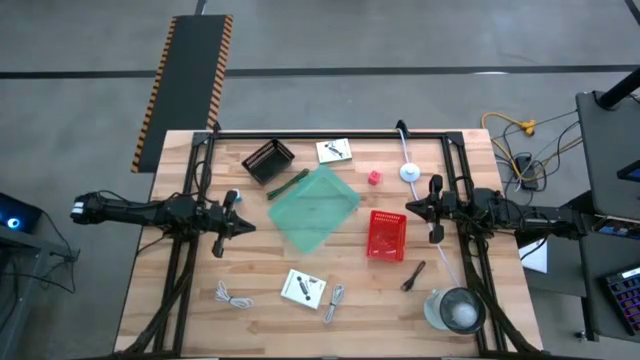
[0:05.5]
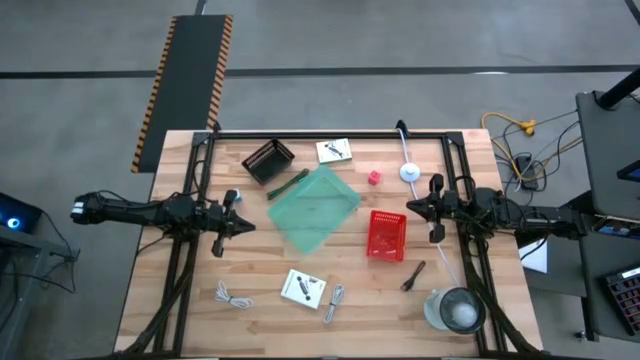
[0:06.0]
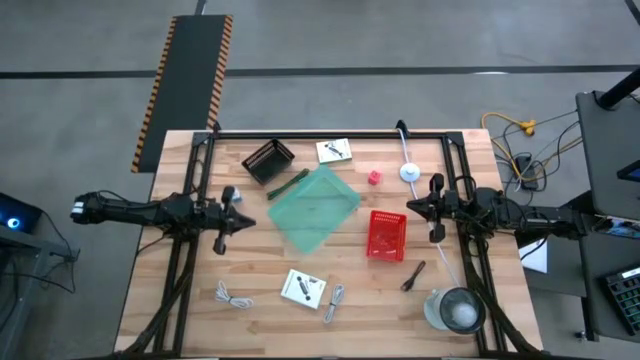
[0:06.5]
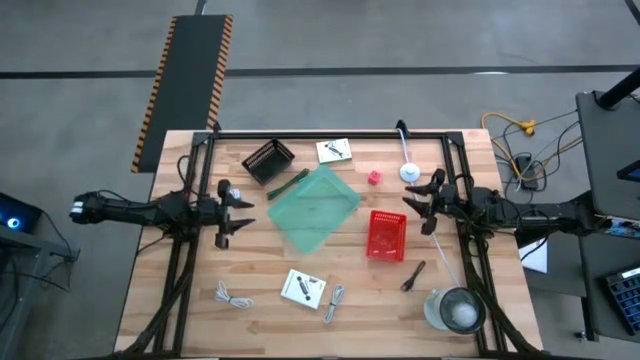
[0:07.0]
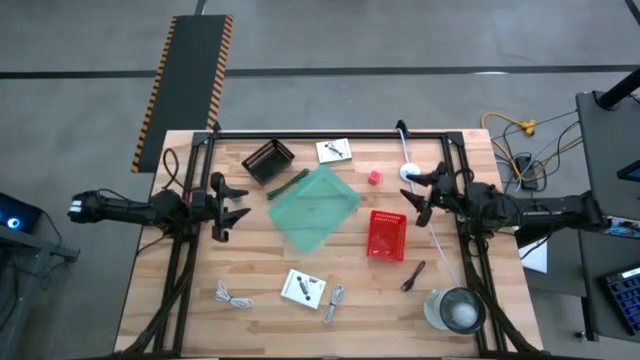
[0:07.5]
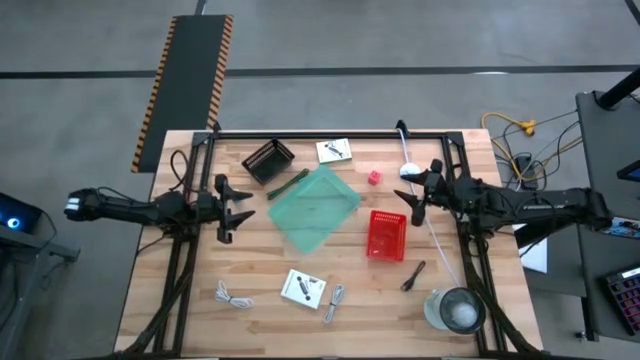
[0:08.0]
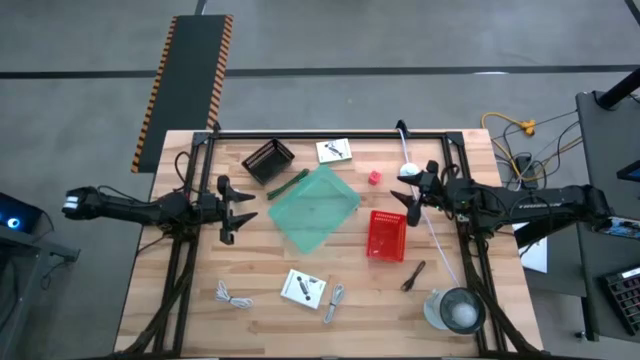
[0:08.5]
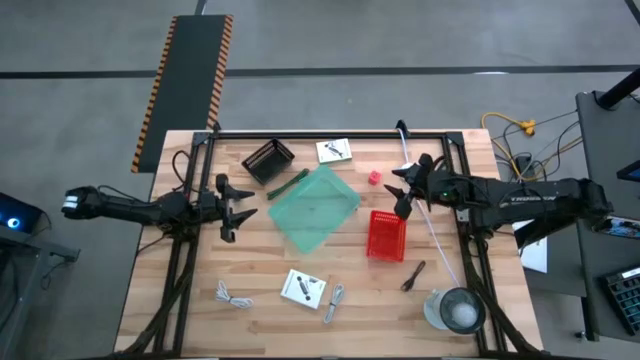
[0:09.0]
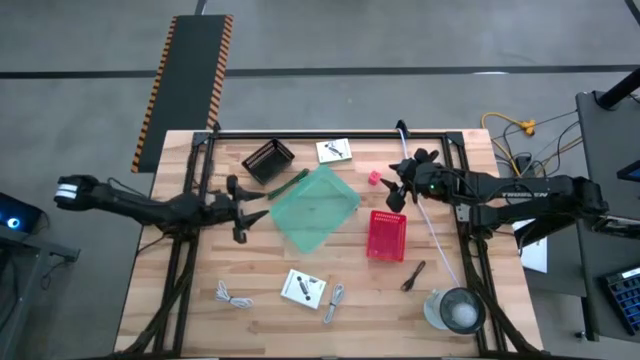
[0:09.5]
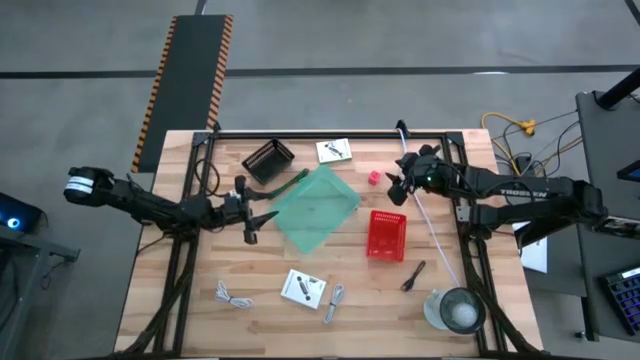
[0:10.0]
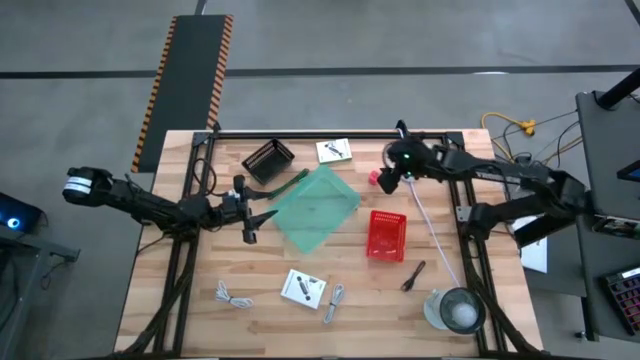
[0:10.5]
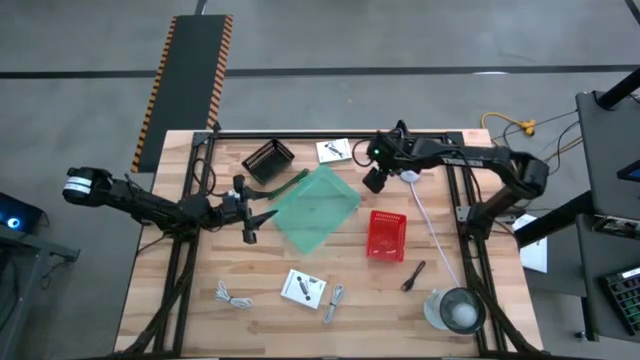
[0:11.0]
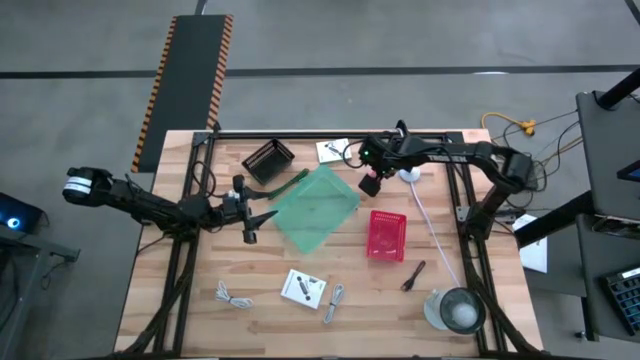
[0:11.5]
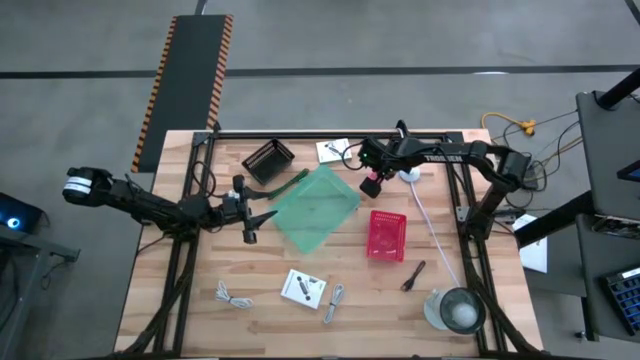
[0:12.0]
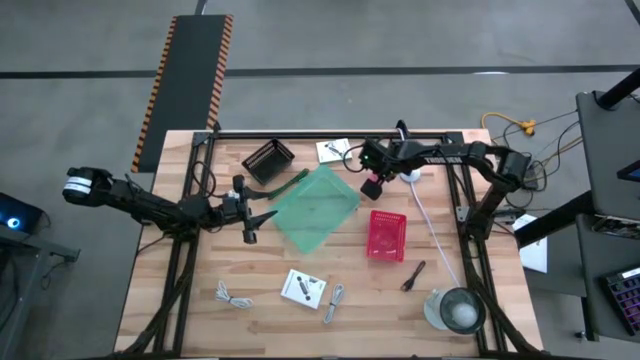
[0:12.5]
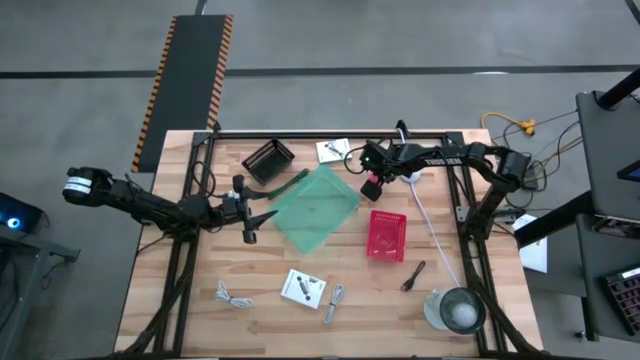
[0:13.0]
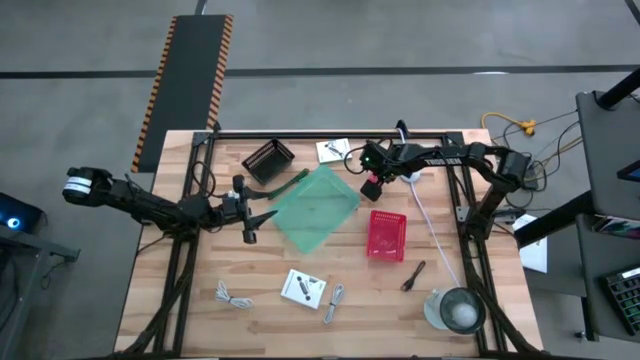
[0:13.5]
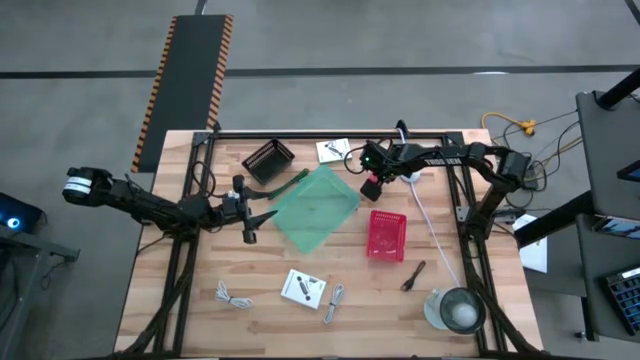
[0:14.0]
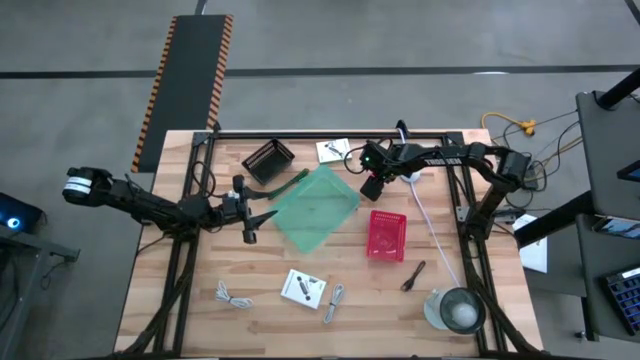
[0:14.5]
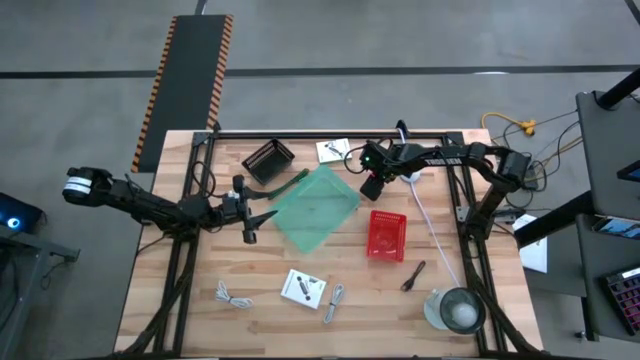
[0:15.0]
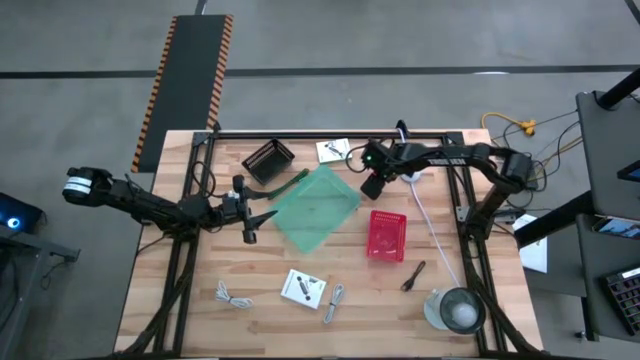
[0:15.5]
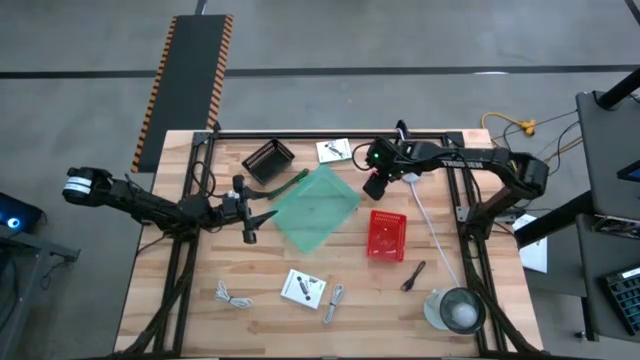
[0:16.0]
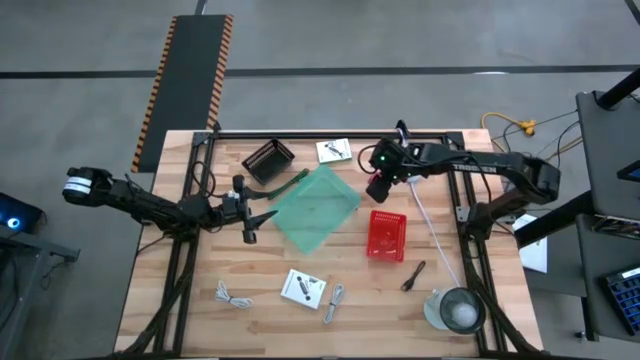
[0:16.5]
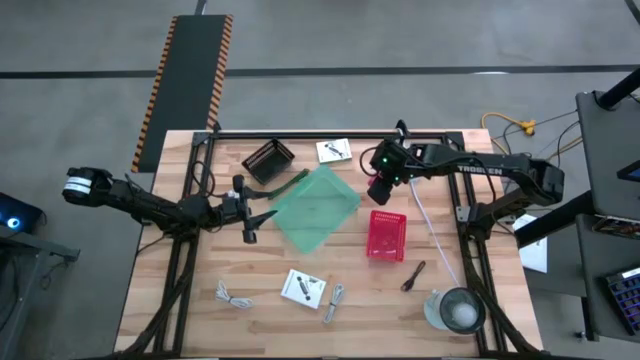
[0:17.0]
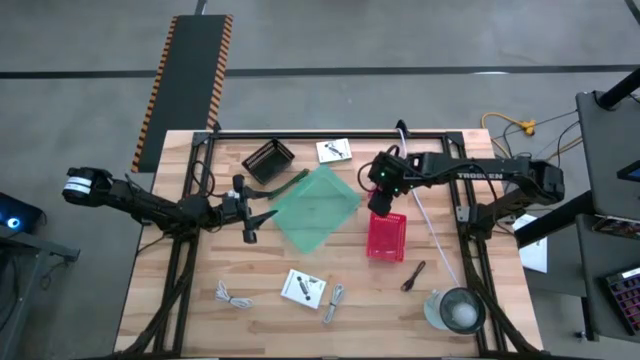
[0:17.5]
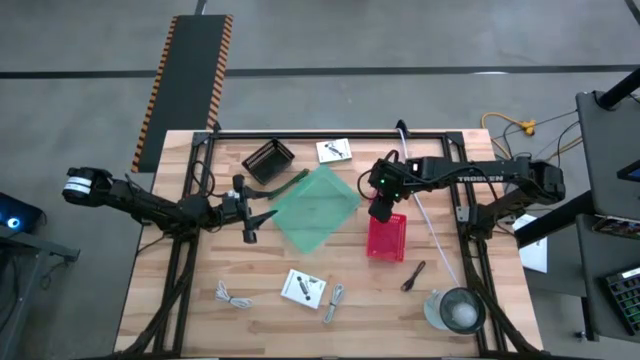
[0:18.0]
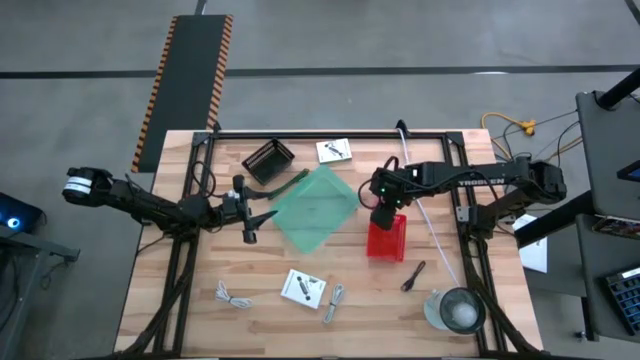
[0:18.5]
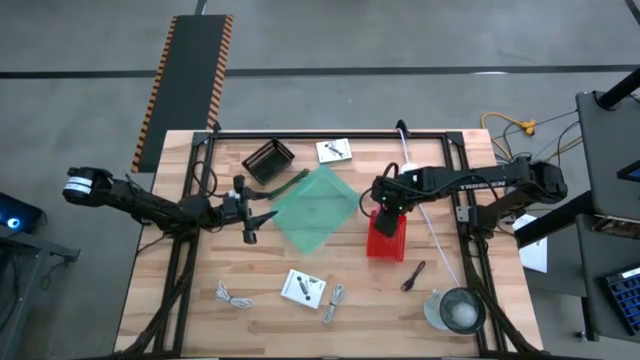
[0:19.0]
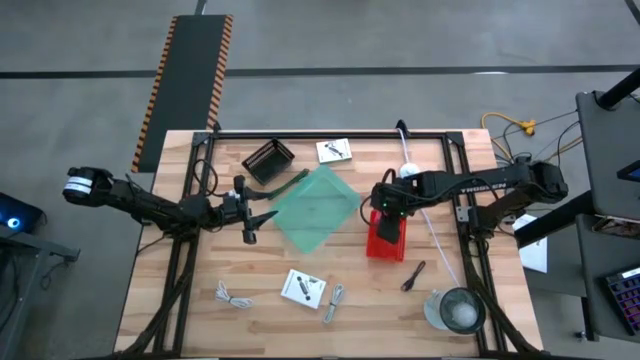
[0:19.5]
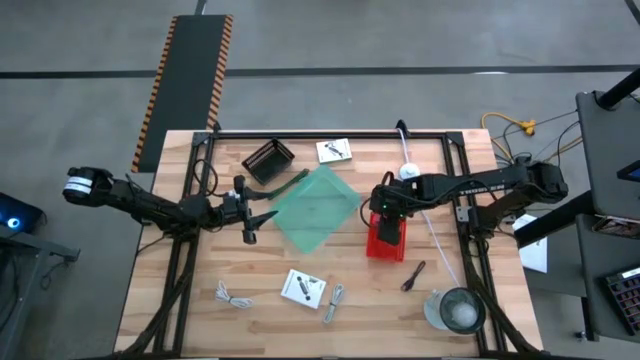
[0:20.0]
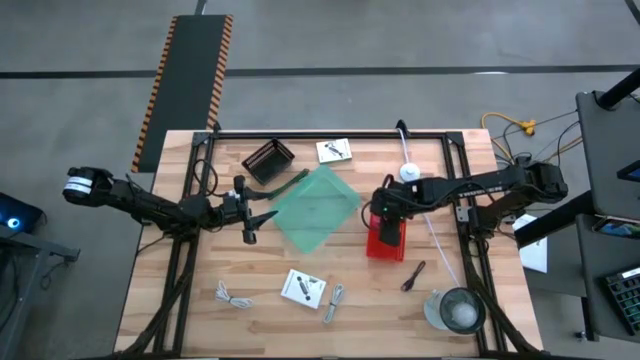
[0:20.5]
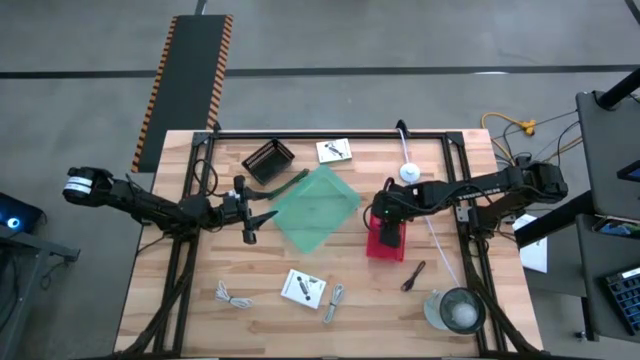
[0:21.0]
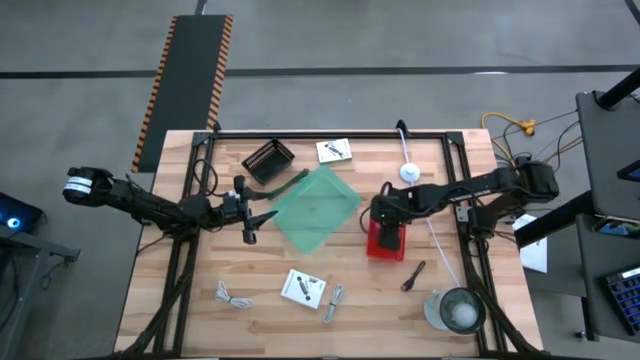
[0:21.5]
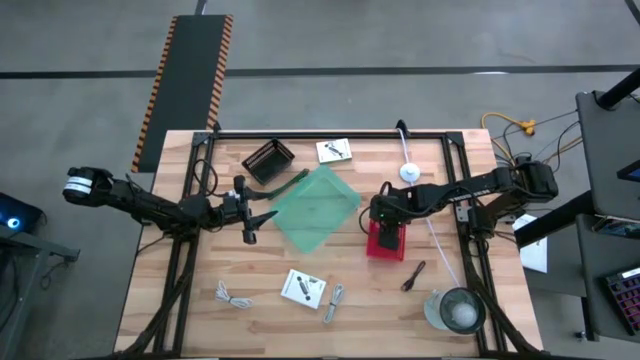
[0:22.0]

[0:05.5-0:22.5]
Task: Pick and place items into bin
Put the pink charger adapter into the red bin

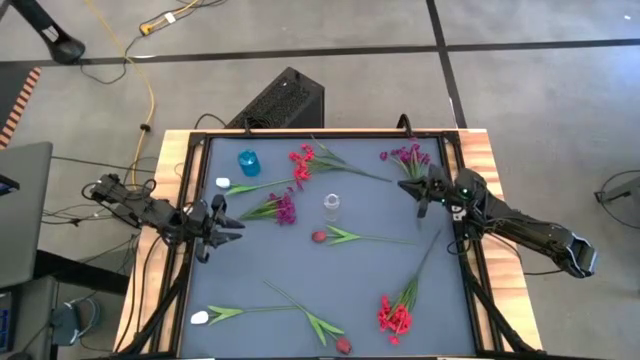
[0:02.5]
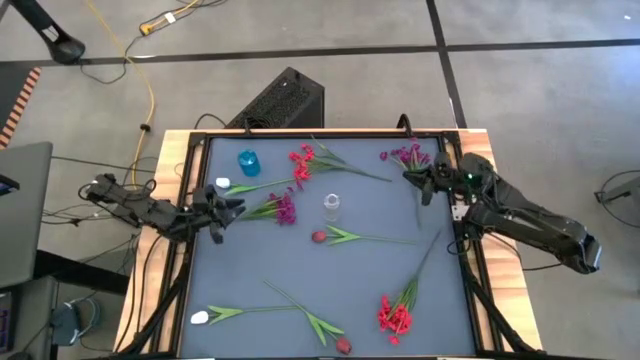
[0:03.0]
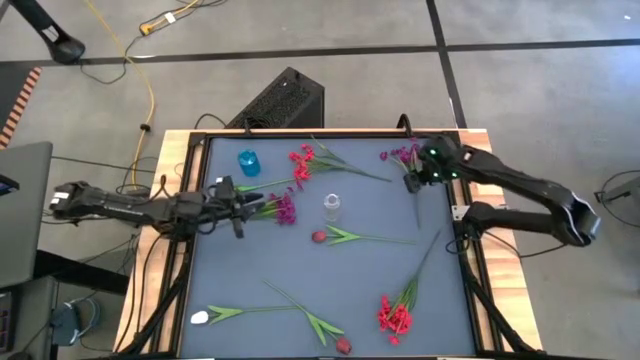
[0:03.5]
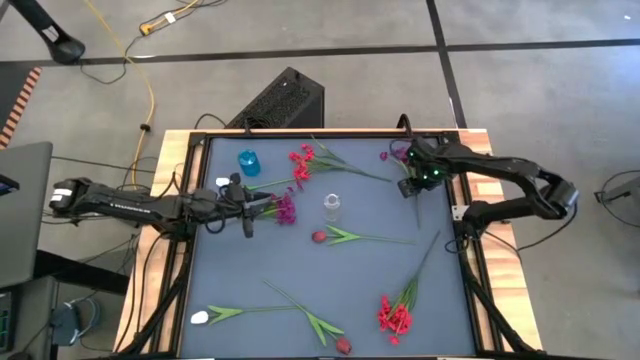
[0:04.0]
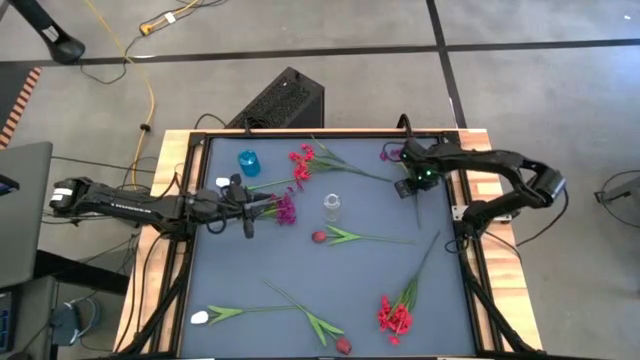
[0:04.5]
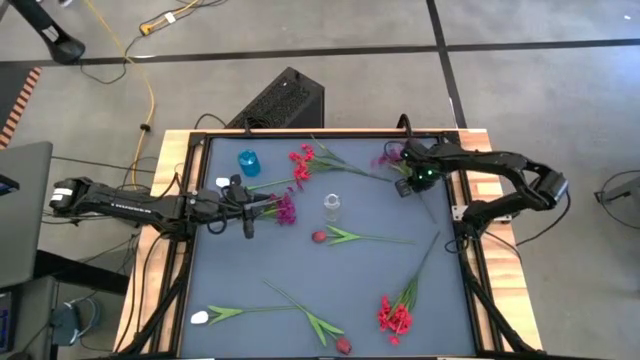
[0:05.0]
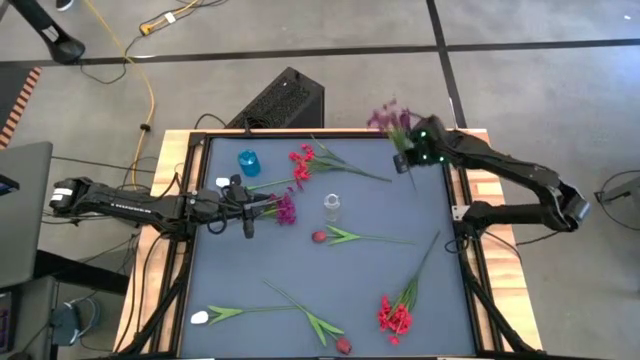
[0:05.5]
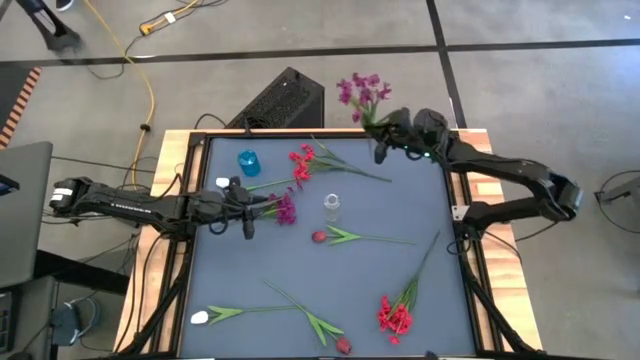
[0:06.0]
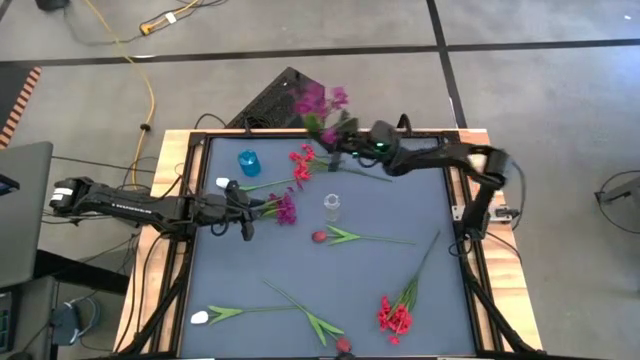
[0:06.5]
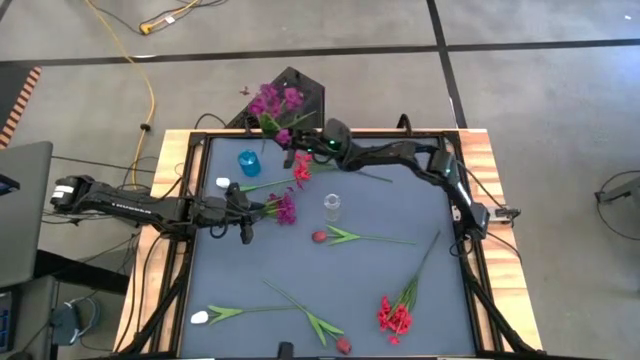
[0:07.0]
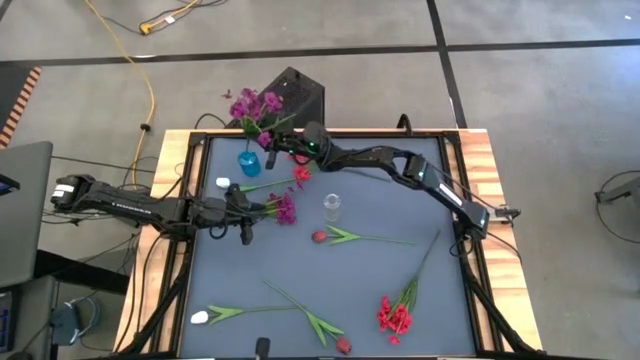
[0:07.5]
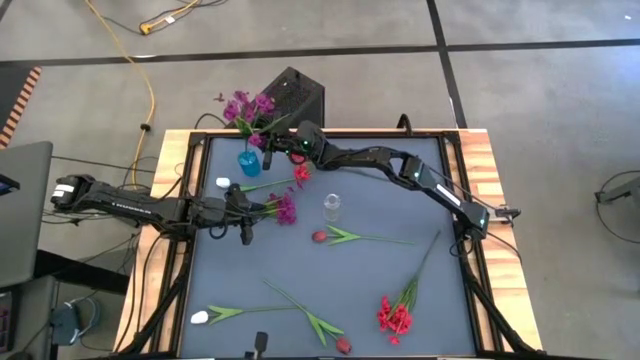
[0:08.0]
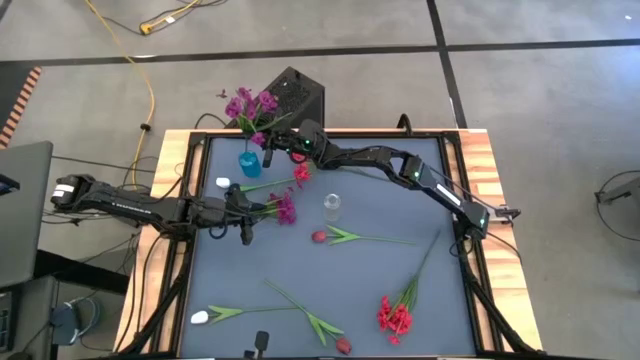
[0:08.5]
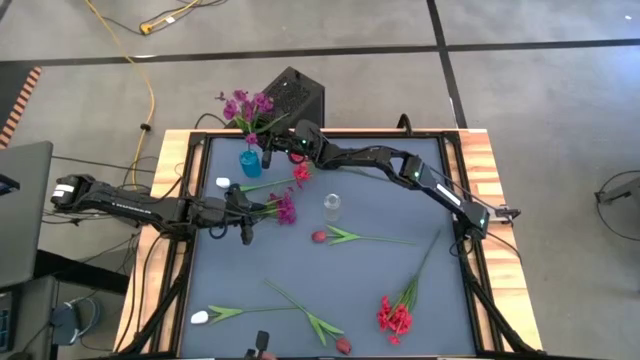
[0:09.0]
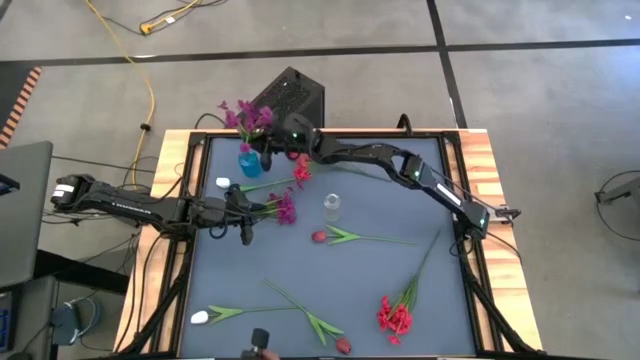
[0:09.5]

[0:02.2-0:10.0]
Task: Sort flowers into vase by color
Put the right purple flowers into the blue vase
